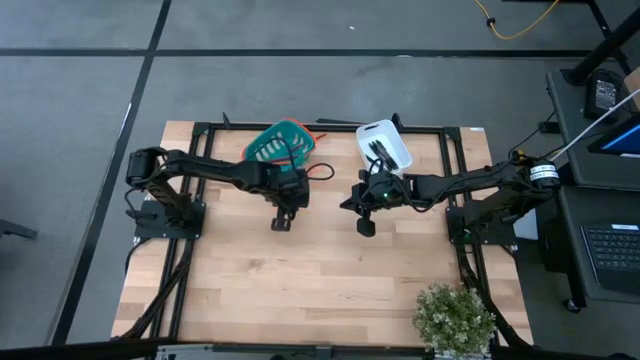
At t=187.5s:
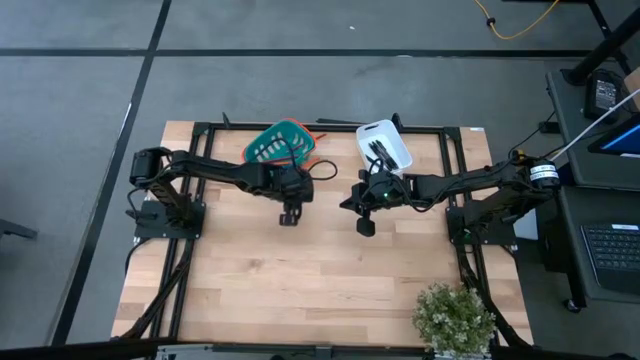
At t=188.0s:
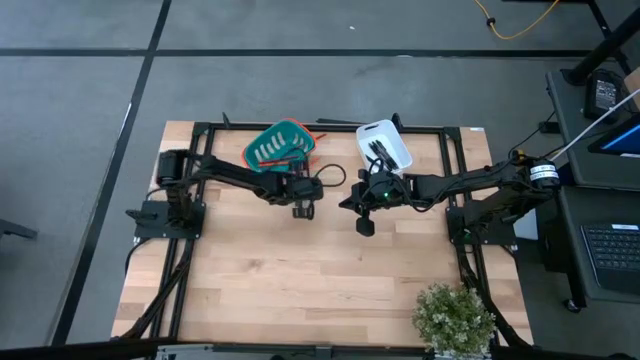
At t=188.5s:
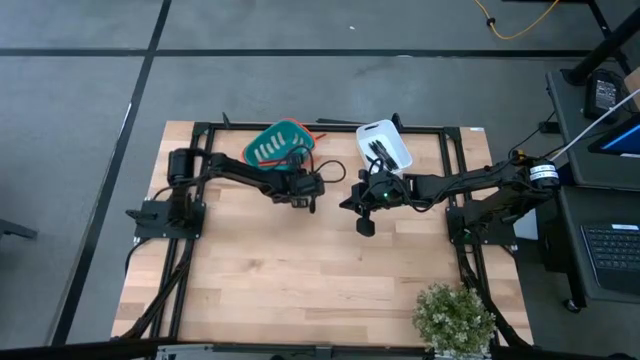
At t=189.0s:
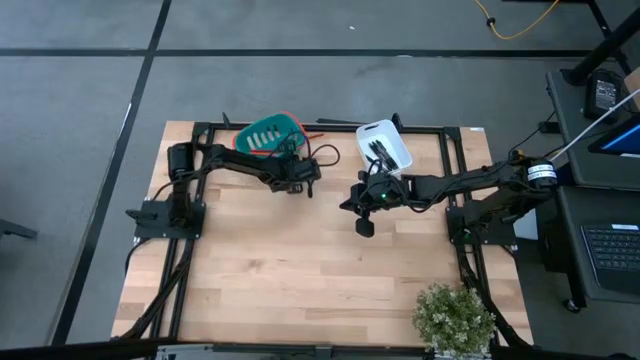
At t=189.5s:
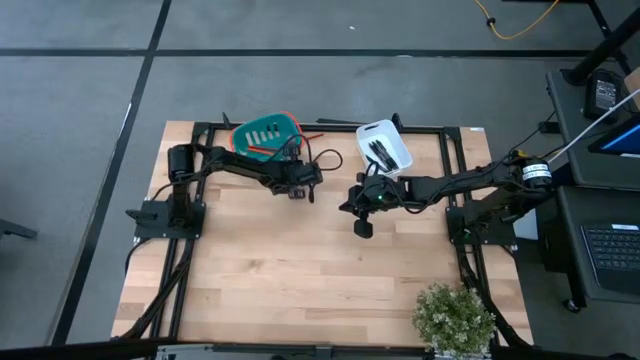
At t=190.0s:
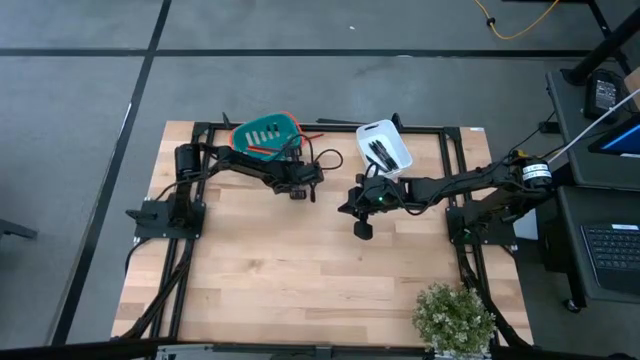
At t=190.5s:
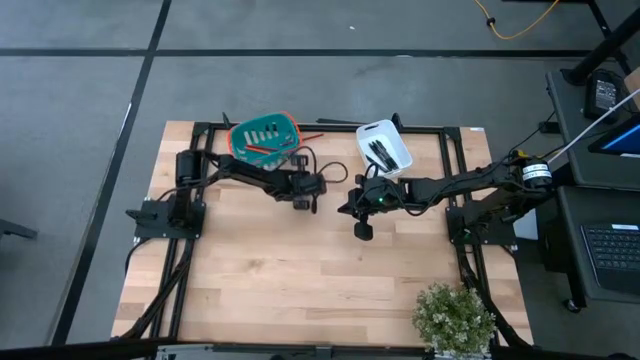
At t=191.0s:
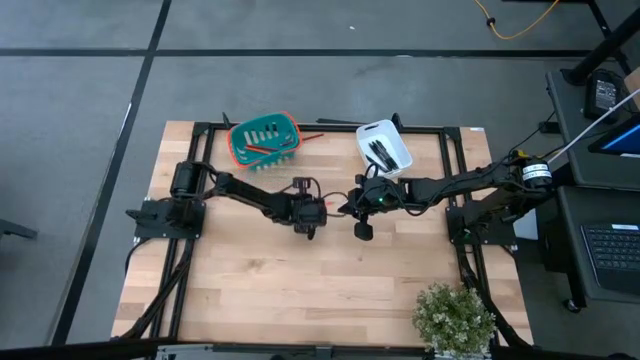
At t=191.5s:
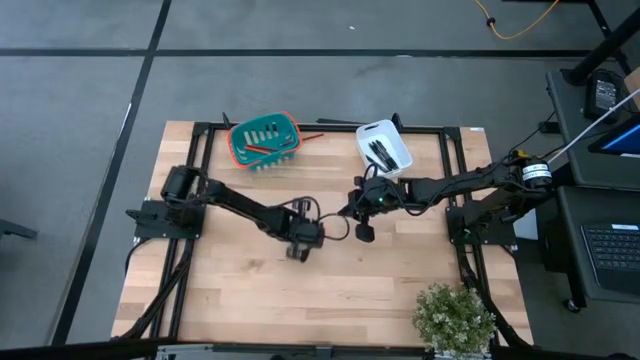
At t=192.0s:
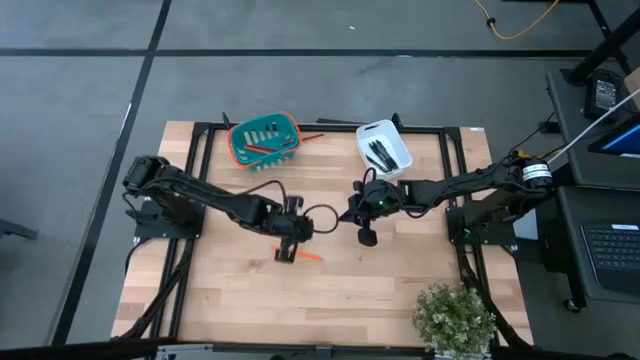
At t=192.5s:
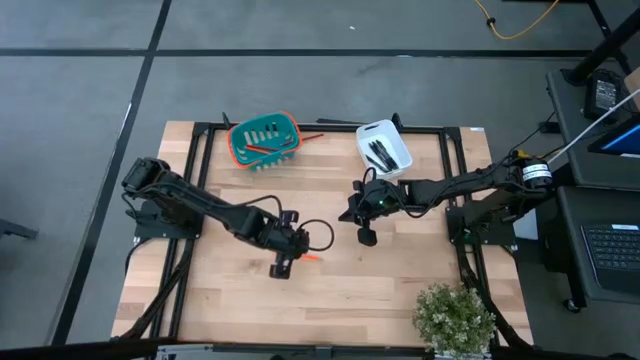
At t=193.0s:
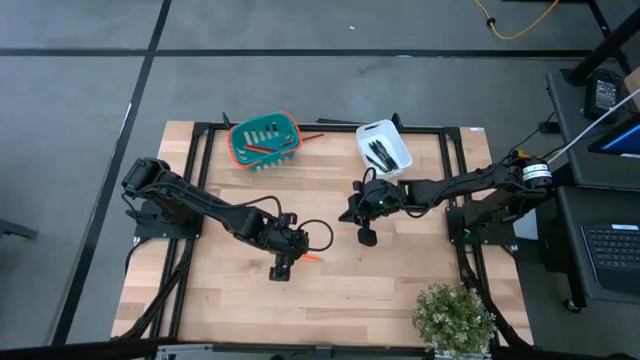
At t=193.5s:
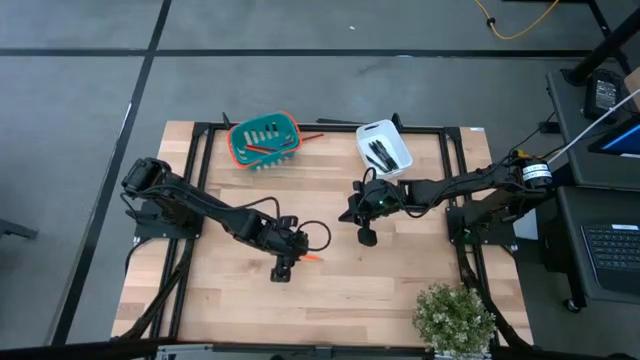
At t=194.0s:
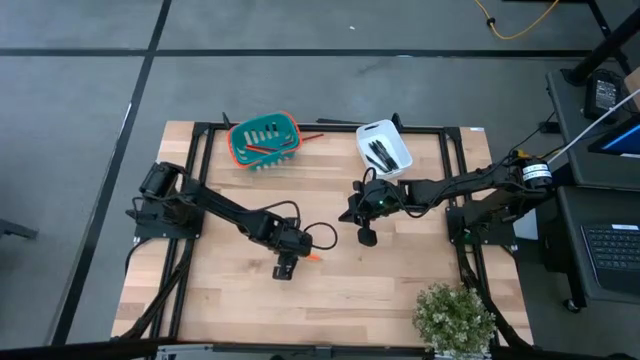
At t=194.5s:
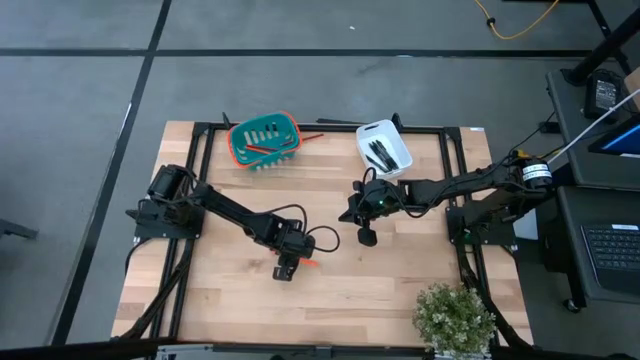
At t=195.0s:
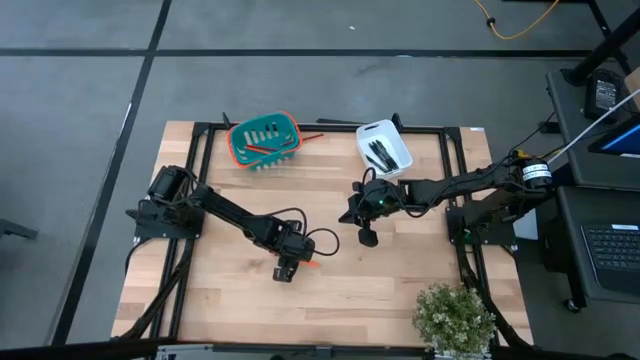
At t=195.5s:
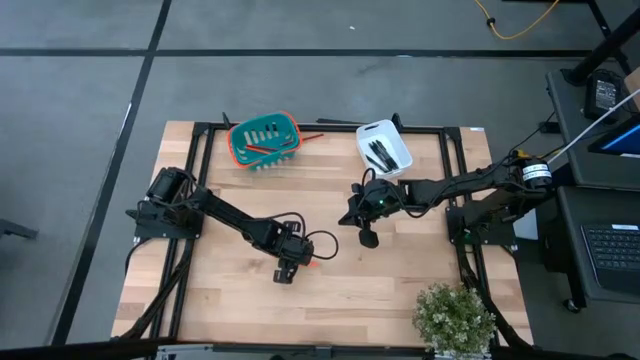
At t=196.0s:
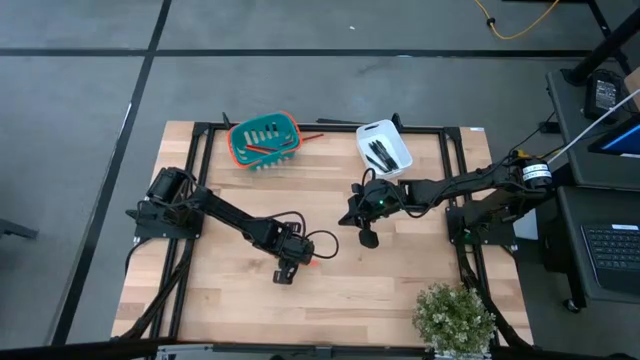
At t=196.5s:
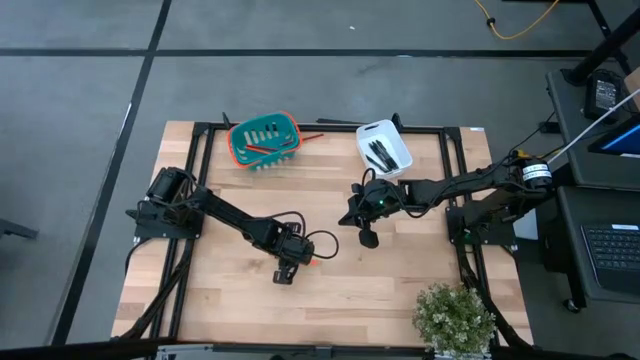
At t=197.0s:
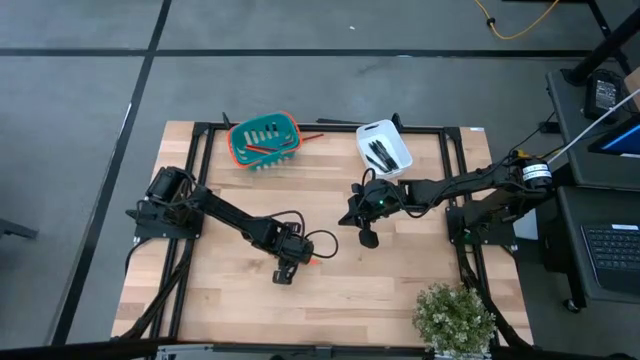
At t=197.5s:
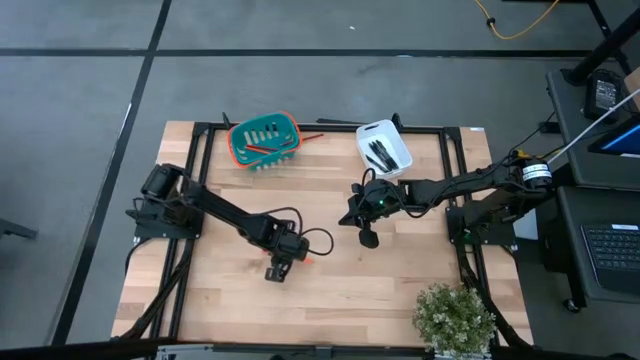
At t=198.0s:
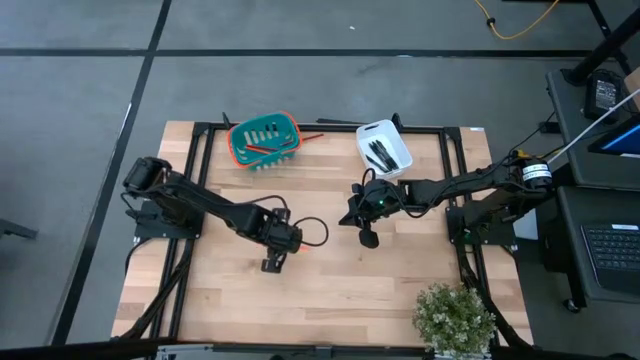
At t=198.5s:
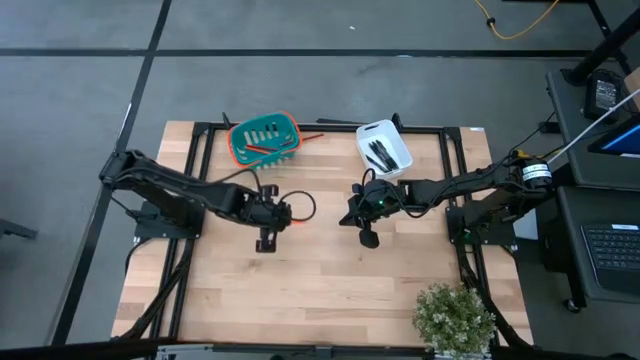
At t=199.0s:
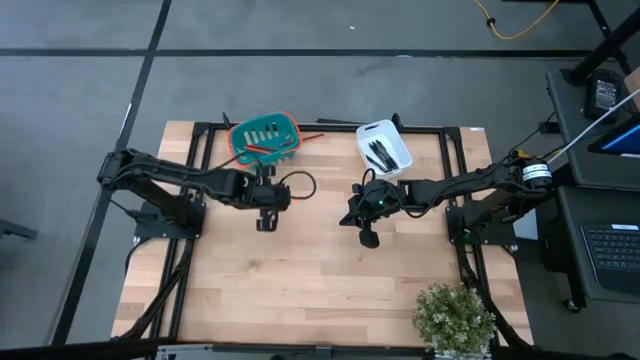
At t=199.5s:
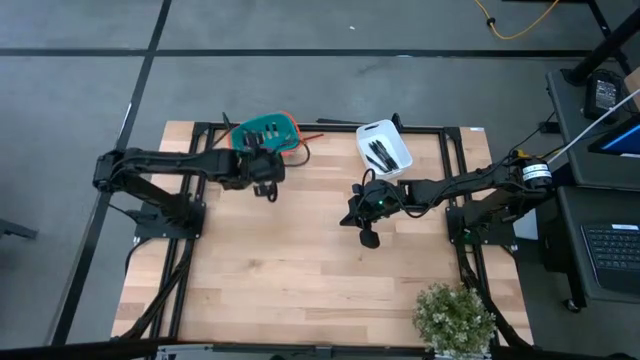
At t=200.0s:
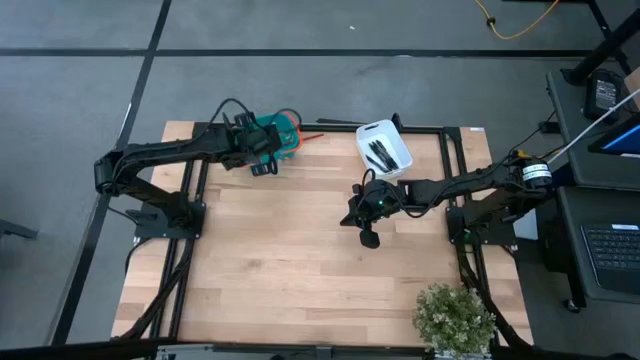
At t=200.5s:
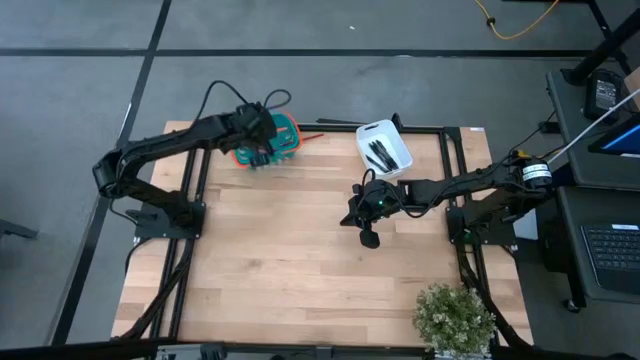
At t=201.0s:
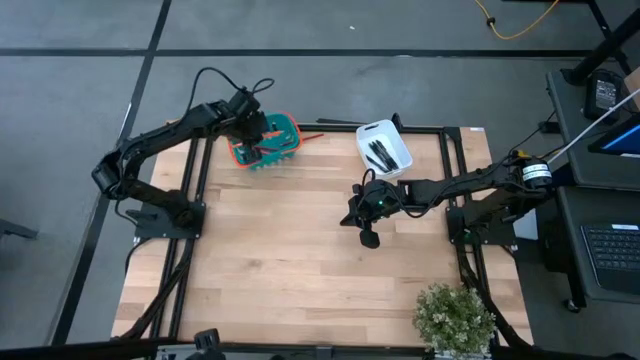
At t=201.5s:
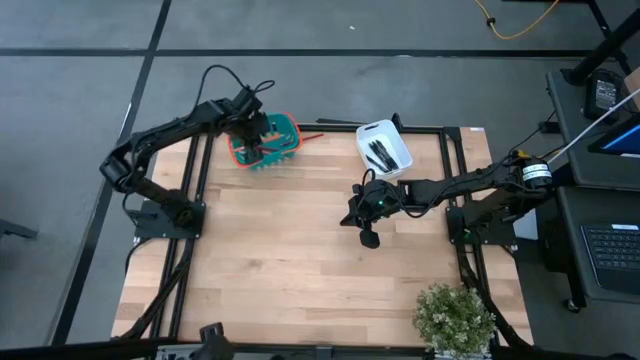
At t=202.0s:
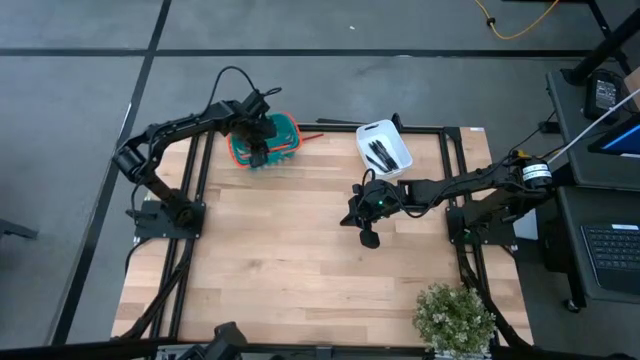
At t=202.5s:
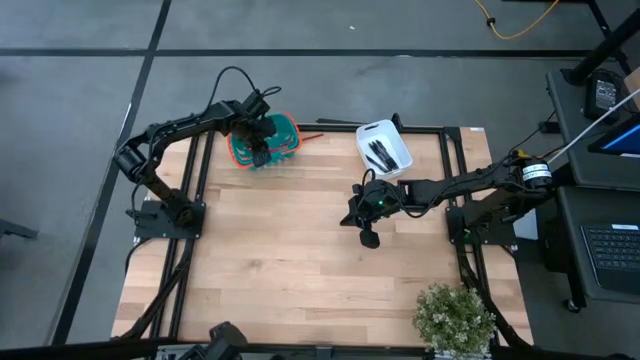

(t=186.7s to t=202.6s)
Task: Sort pens & pencils
Put the orange pencil into the blue bin

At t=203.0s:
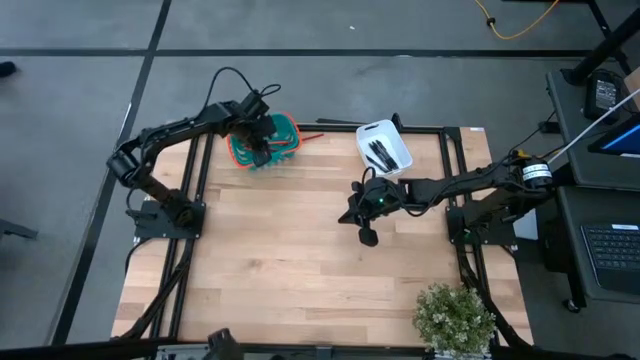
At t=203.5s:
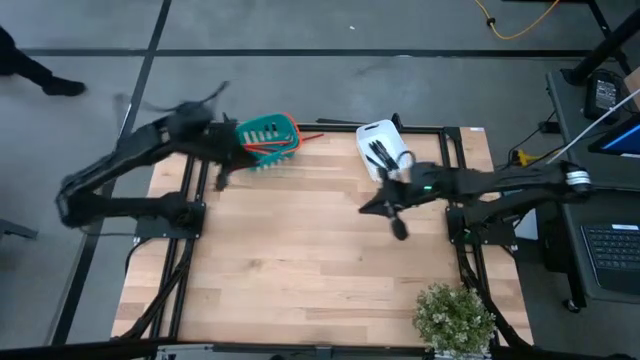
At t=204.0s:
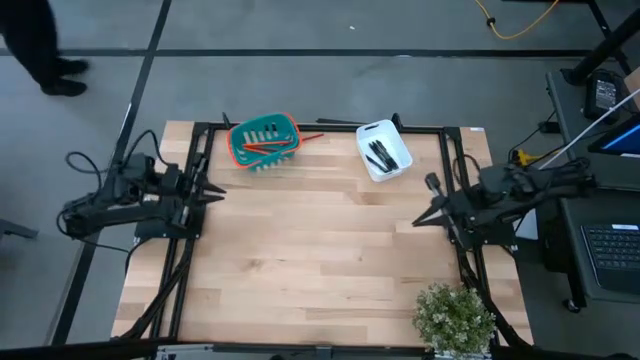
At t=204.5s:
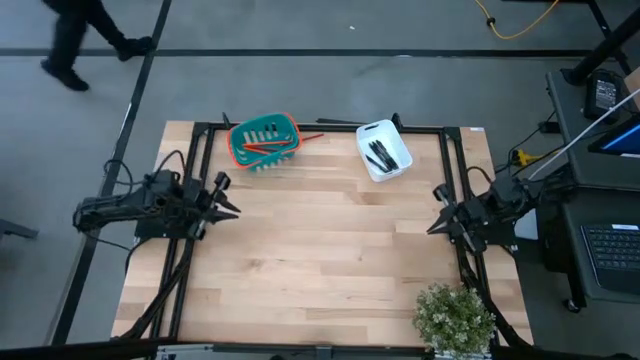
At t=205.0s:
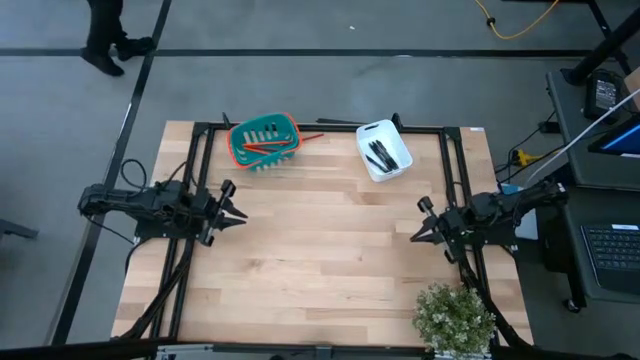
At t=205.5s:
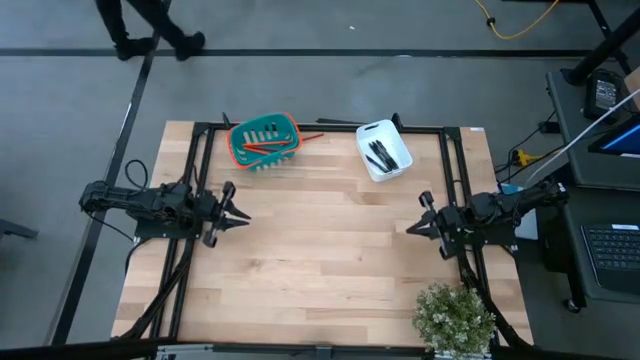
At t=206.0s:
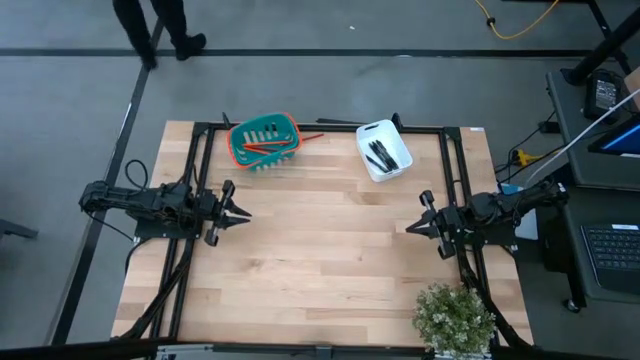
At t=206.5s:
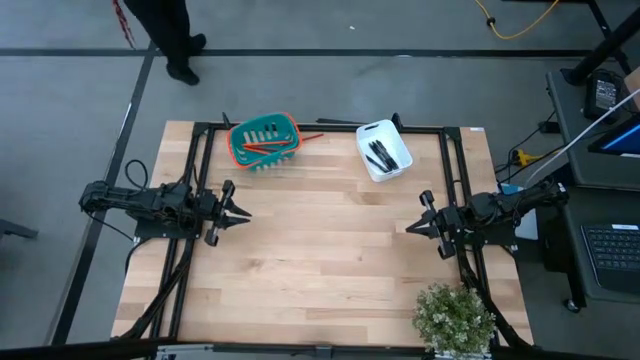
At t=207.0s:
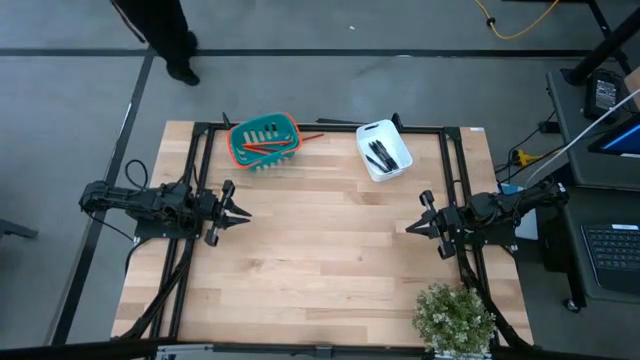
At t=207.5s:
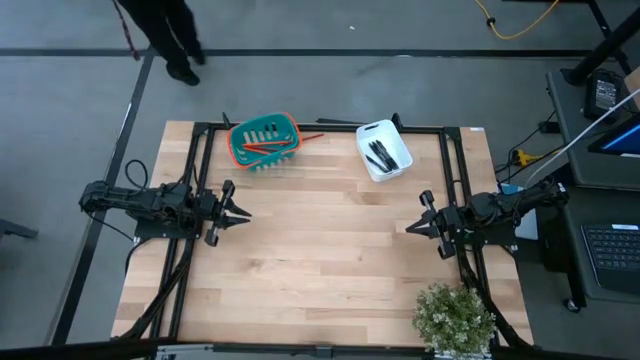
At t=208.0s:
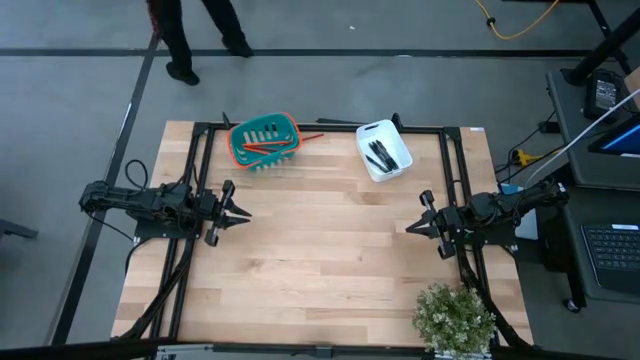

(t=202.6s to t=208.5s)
Return to Home Position

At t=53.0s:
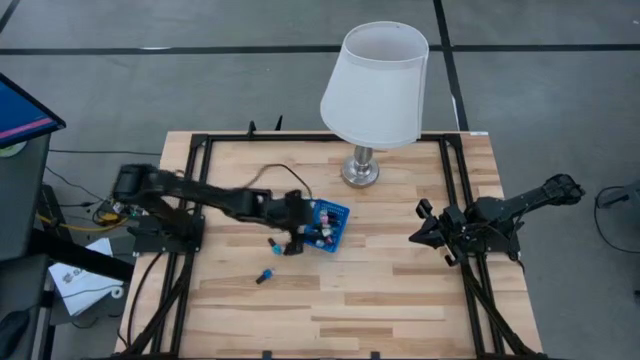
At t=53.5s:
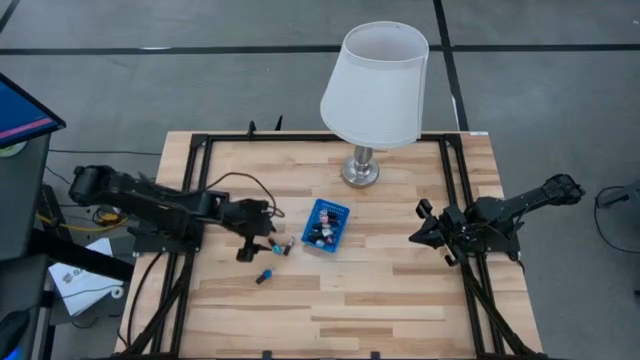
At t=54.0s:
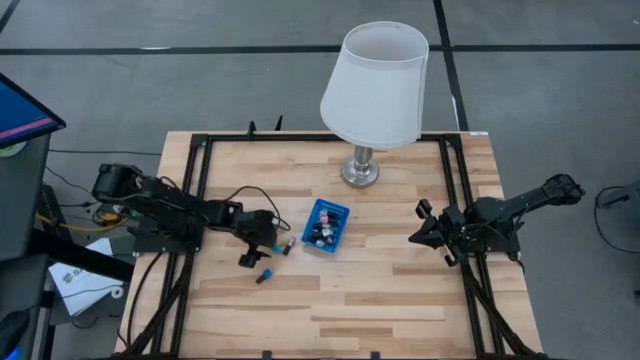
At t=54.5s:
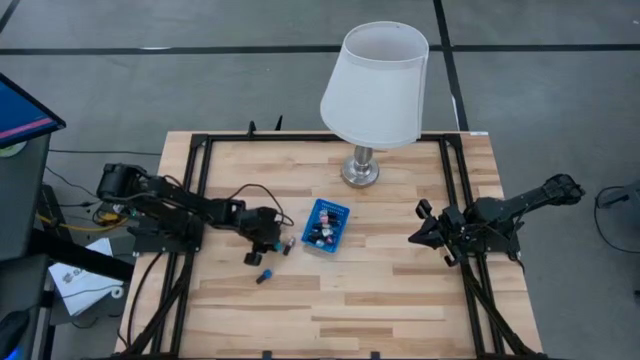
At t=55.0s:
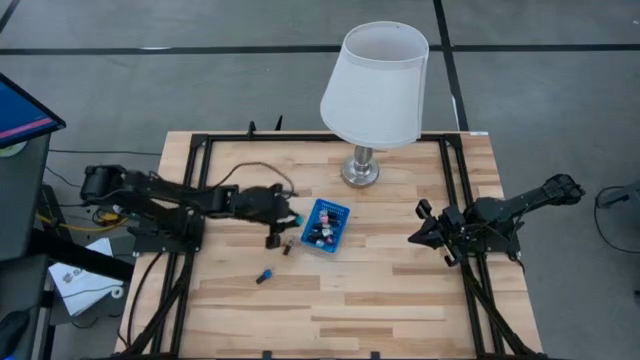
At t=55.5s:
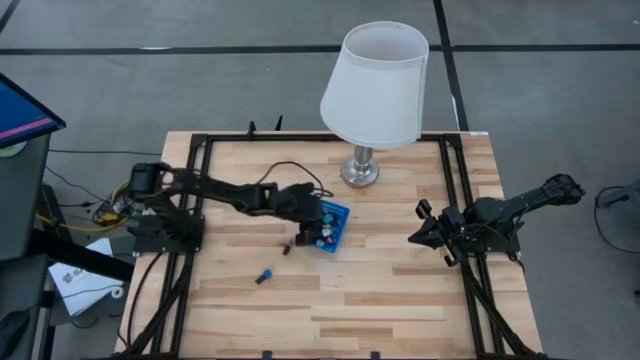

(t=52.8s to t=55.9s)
Task: Pick & Place Nail Polish
Put the top blue nail polish into the blue basket
